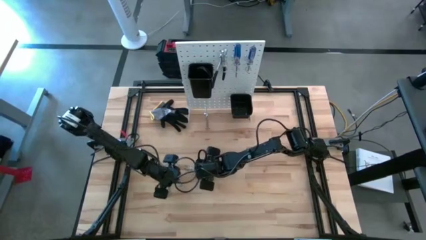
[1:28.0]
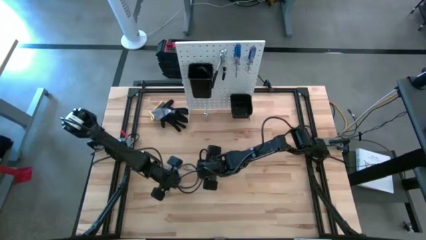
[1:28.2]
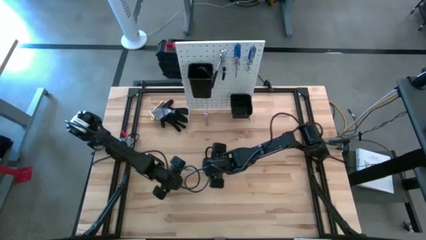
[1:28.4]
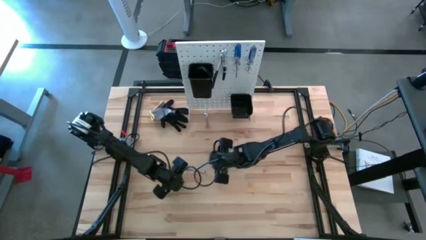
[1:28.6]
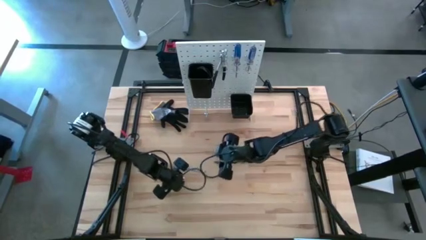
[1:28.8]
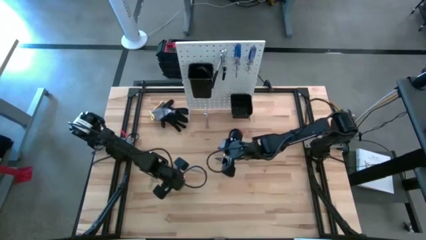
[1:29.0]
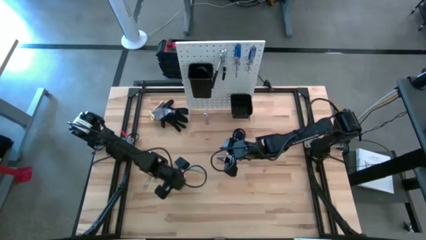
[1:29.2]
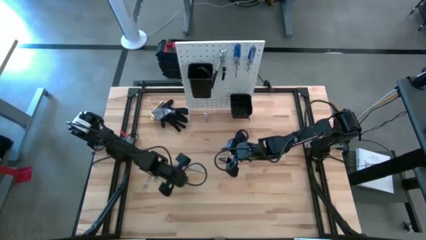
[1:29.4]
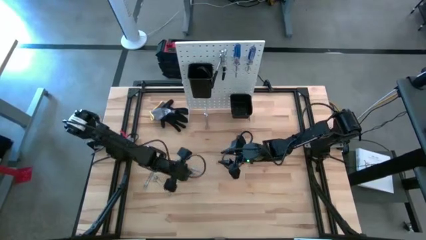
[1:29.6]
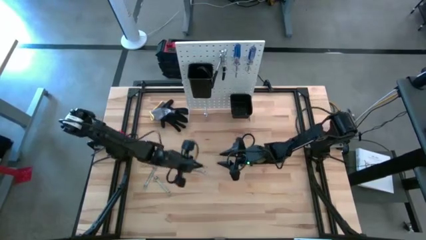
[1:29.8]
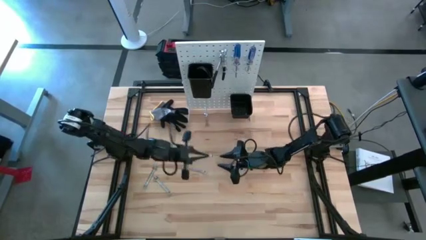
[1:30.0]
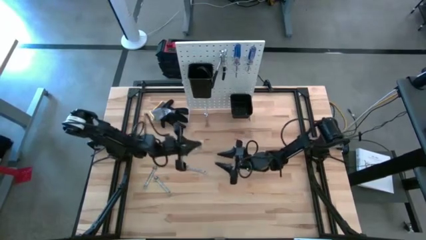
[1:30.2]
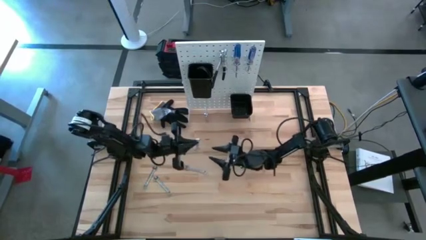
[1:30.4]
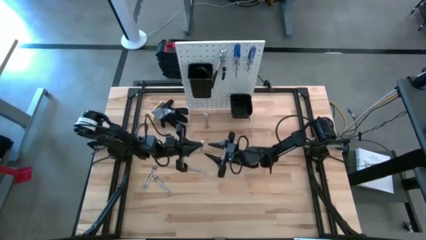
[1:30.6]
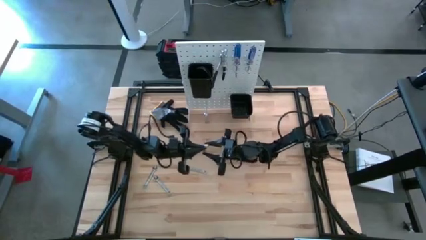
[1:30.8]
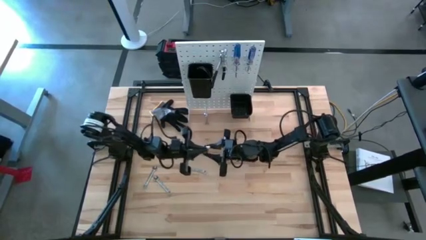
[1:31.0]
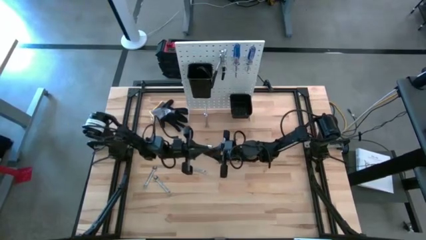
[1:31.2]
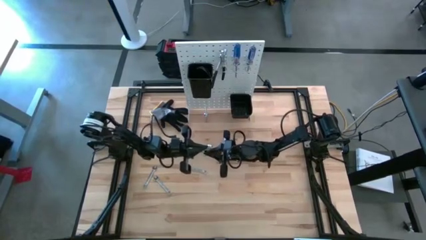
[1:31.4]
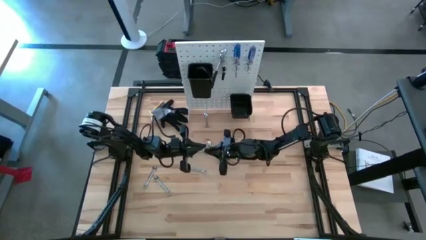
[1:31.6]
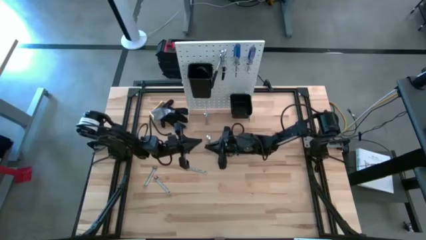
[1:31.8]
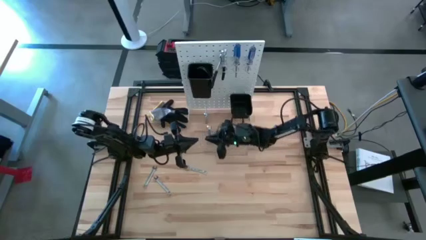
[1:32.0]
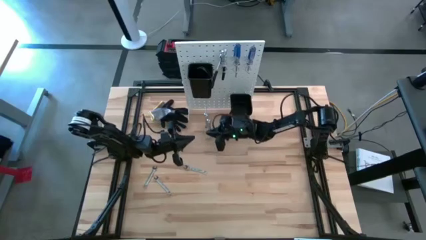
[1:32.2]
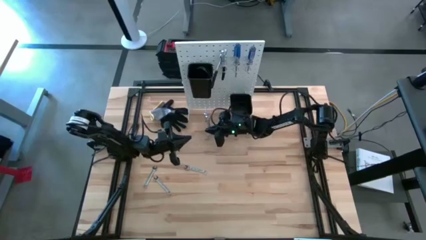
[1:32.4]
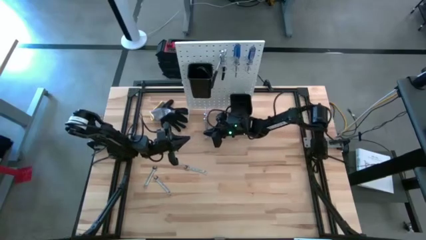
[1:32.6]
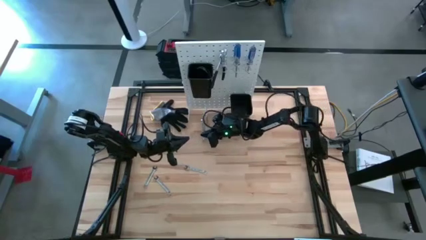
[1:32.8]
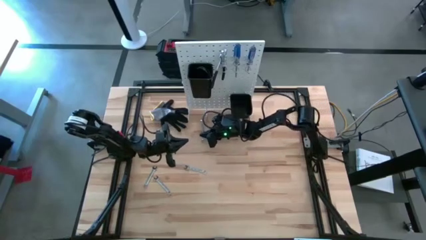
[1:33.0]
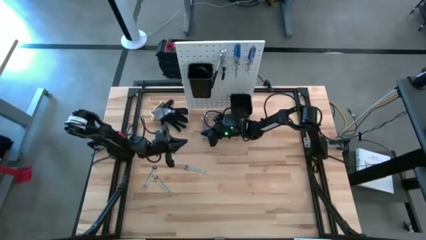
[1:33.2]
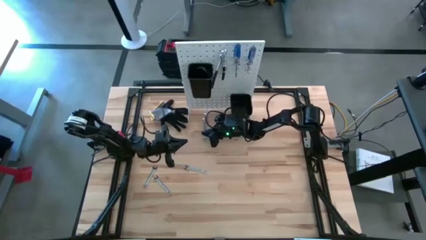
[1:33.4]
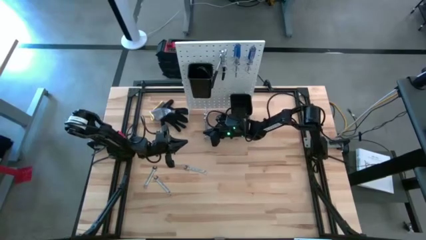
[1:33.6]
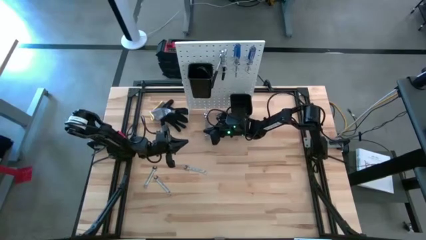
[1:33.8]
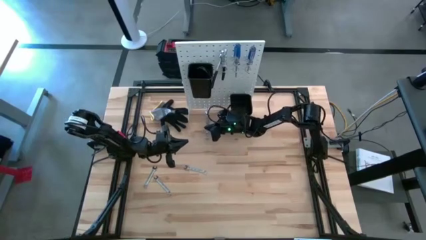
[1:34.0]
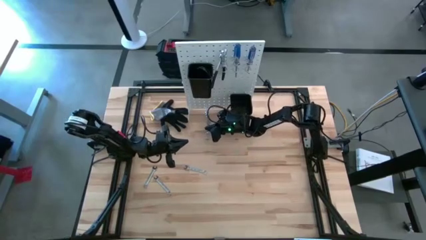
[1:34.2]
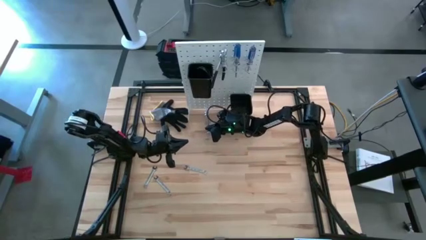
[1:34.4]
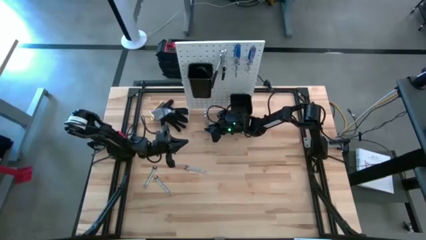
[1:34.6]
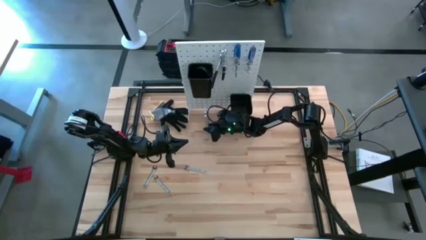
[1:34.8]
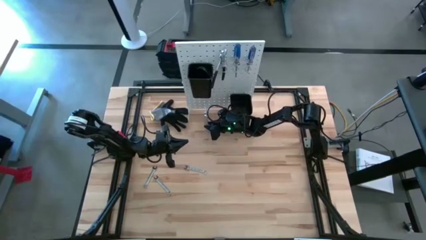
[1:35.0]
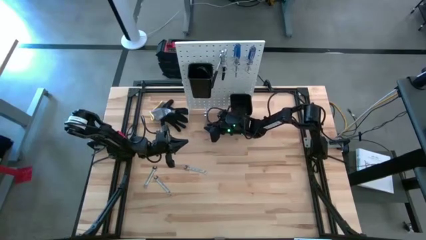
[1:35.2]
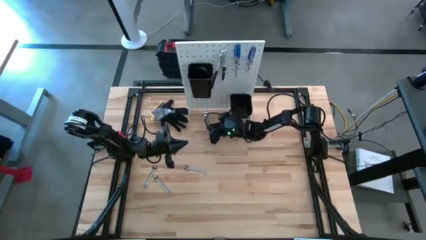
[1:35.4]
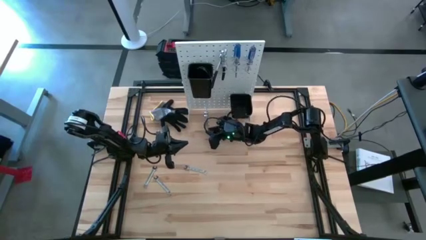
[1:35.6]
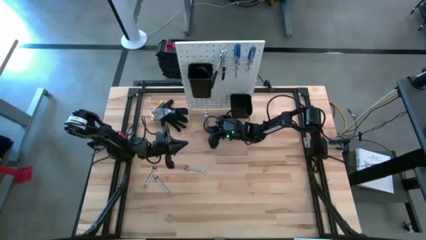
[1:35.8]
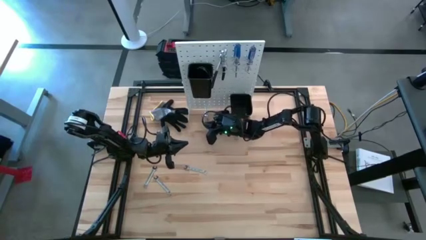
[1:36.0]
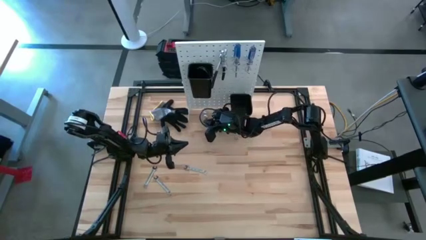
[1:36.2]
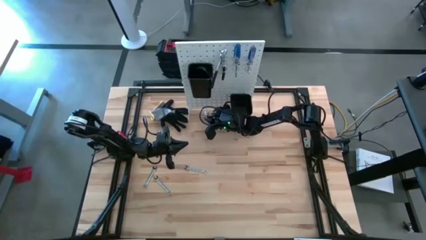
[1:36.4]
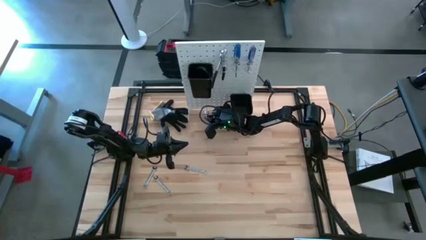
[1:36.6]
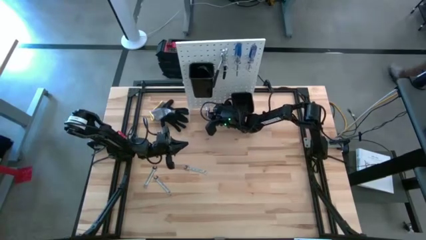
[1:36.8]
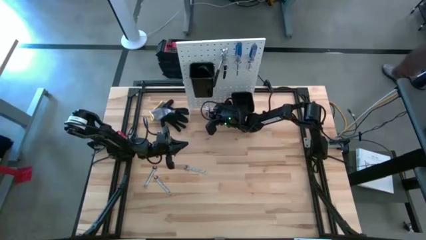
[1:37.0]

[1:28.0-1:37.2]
Task: Hang tools onto peg board
Hang the wrench on the peg board

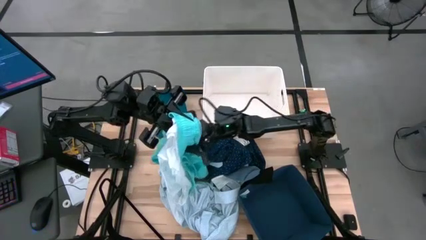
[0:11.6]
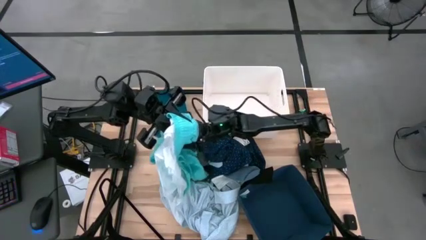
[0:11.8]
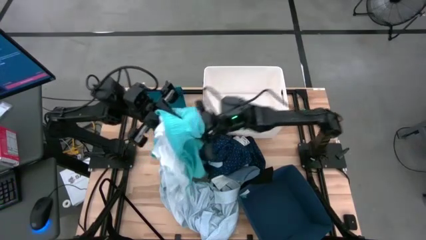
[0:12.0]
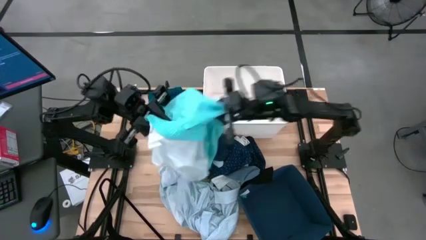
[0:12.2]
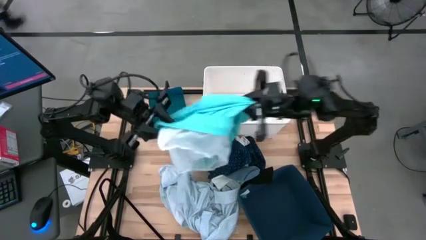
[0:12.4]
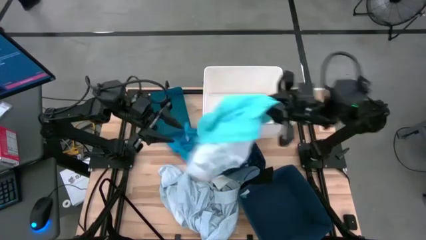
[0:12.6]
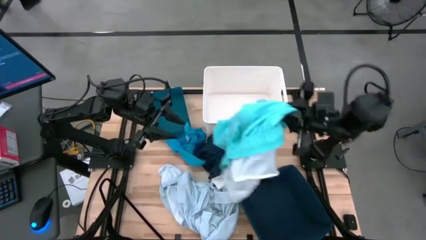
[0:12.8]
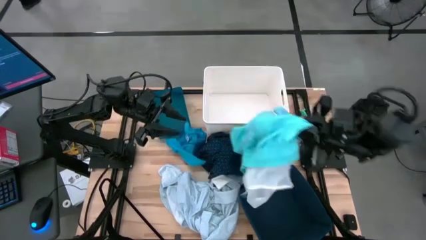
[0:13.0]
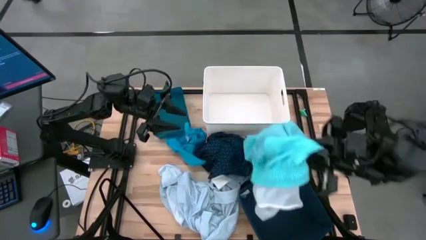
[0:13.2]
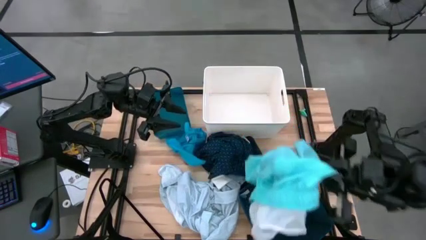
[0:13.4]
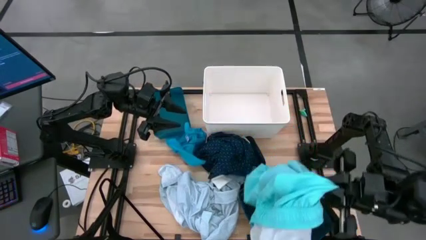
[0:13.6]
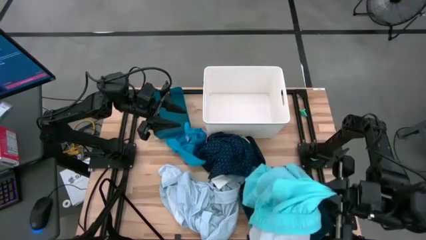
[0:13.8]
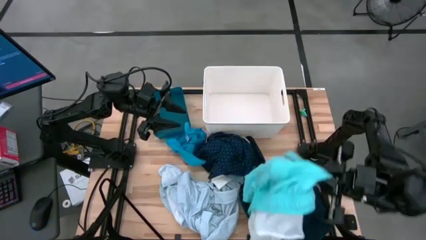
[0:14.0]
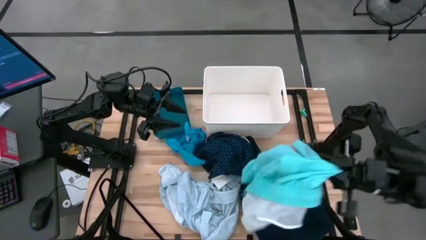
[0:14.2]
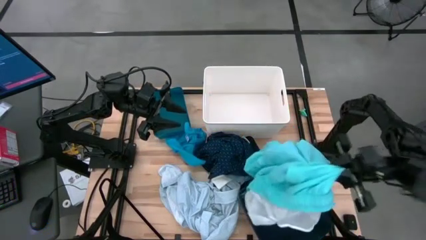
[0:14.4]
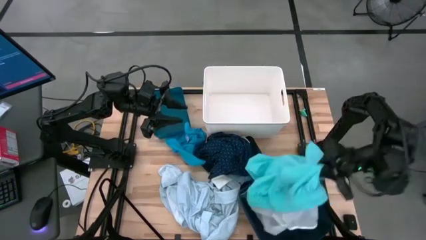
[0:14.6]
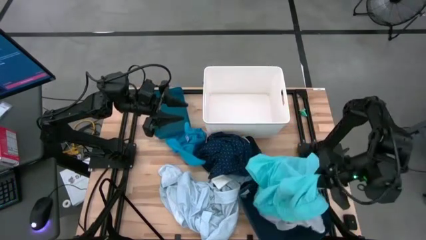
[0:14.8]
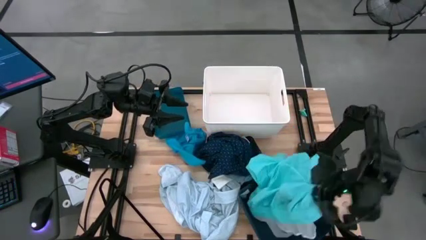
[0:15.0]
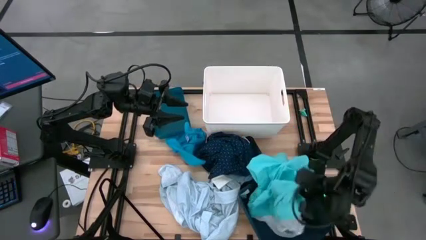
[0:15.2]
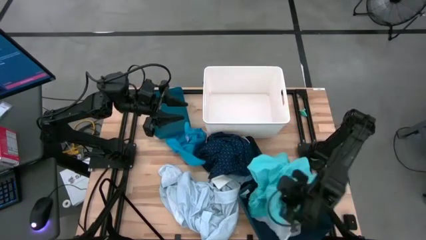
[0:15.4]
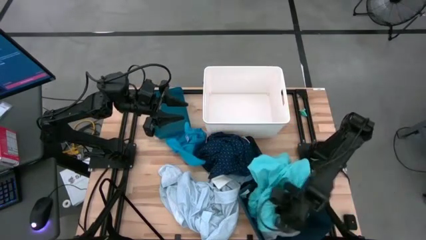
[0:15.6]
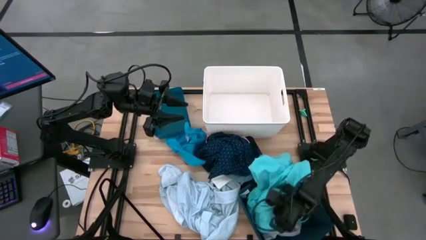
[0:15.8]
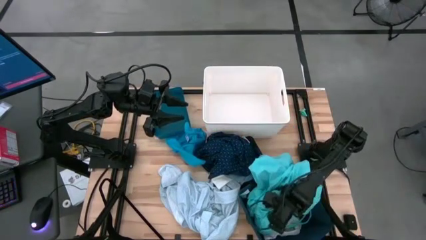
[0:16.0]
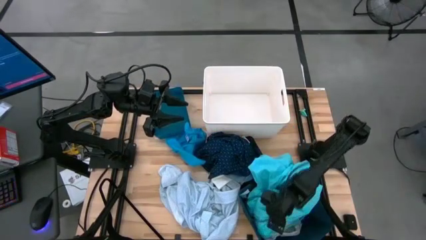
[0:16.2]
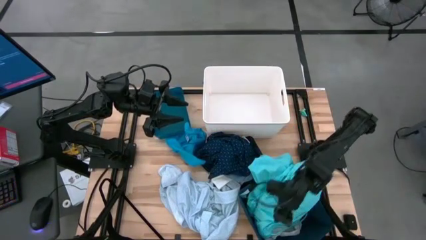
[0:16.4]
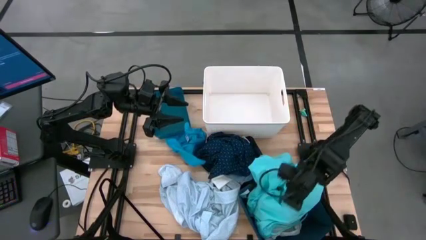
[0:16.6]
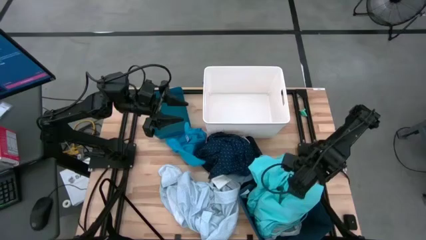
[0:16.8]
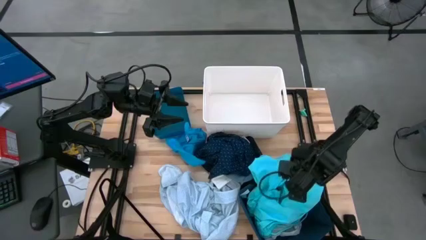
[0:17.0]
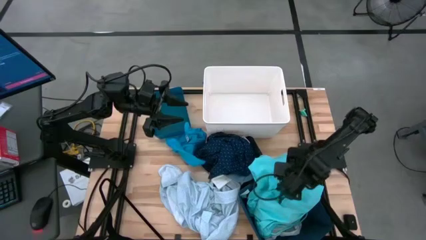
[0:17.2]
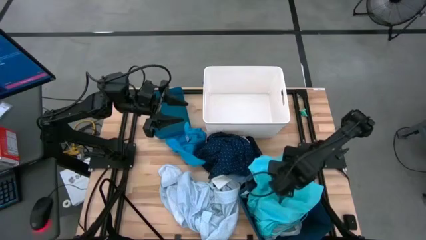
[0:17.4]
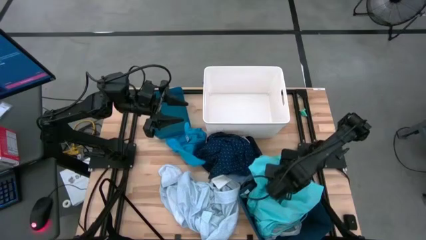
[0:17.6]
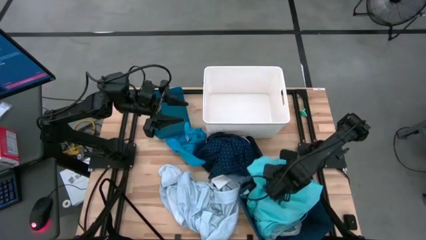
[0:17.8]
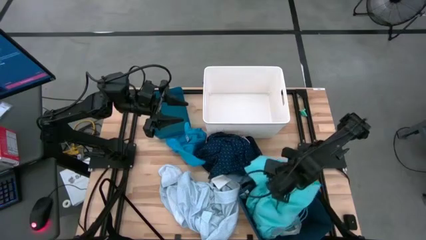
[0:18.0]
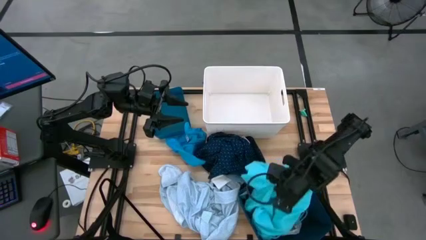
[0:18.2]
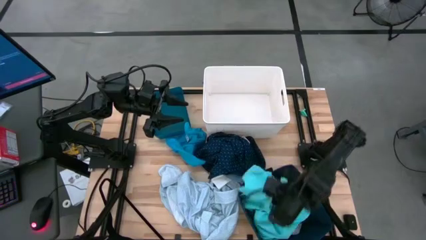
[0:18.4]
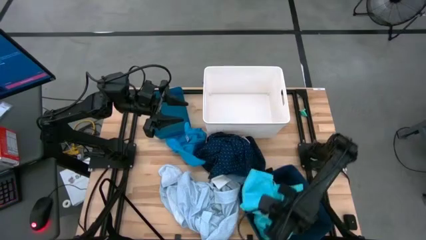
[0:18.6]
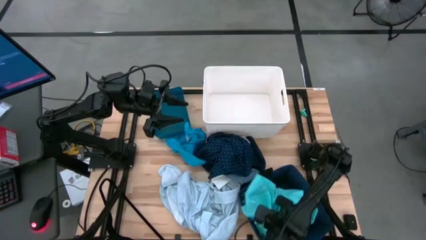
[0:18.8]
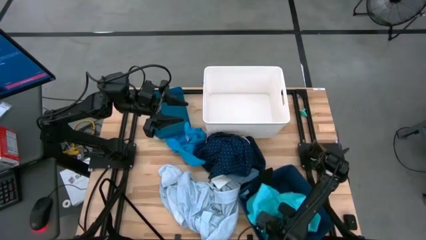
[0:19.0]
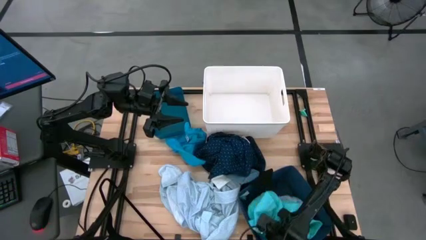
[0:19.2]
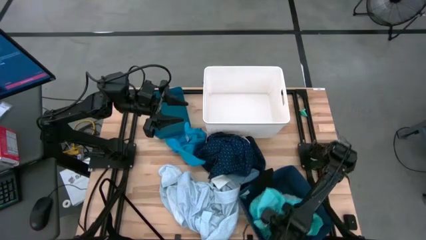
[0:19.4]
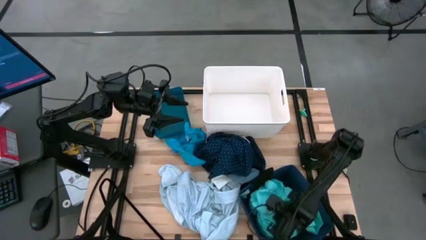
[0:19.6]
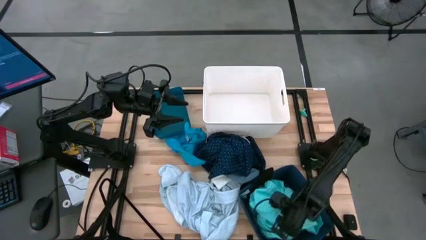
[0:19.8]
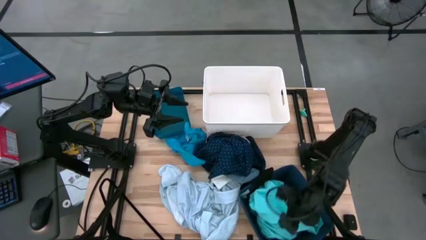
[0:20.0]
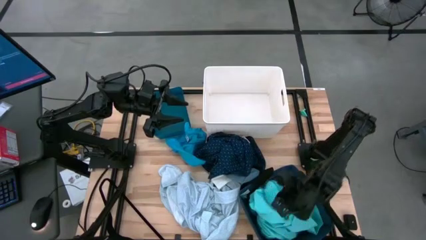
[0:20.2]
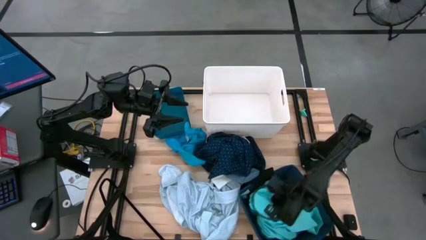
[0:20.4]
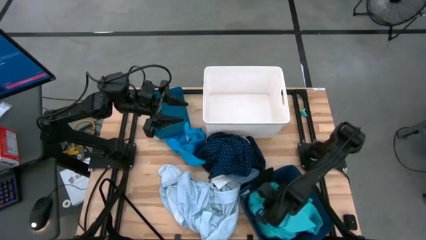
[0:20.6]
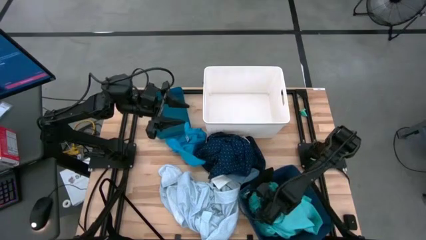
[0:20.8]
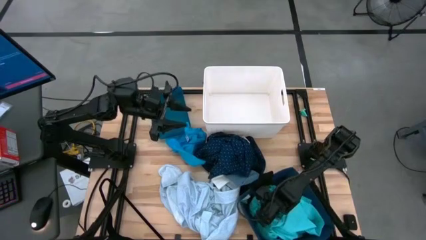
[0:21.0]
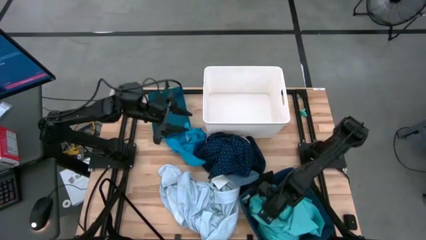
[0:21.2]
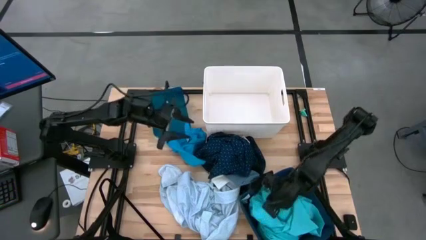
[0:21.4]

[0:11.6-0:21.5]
Task: Pick & Place Cloths
Put the light blue shorts into the dark blue bin
